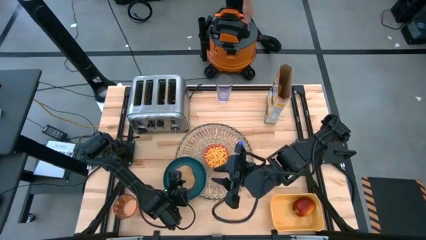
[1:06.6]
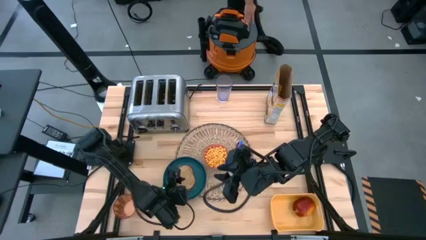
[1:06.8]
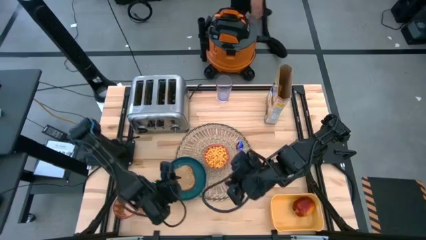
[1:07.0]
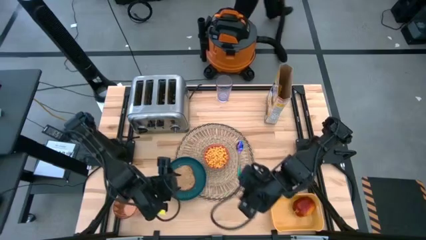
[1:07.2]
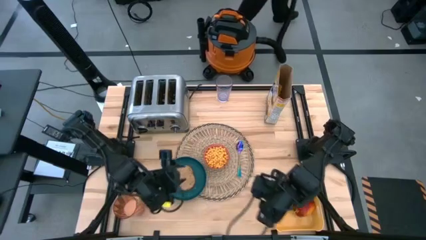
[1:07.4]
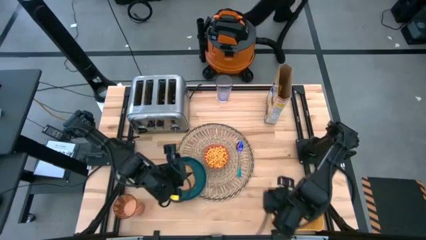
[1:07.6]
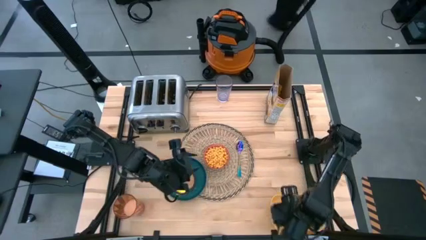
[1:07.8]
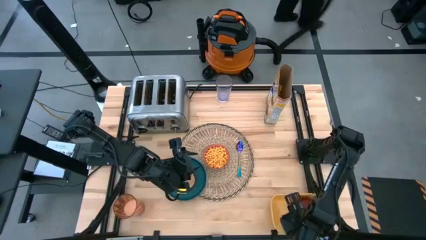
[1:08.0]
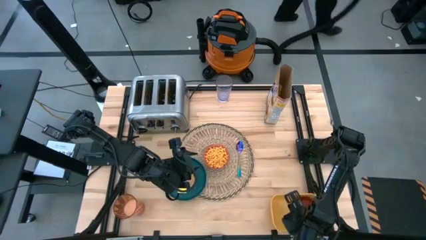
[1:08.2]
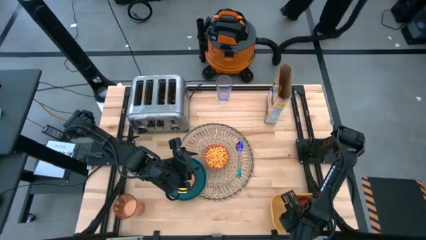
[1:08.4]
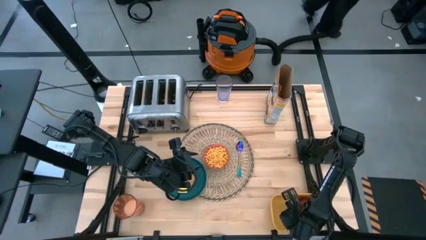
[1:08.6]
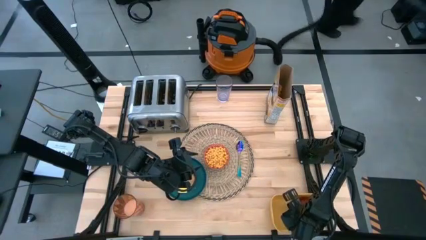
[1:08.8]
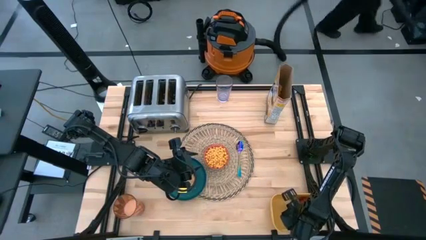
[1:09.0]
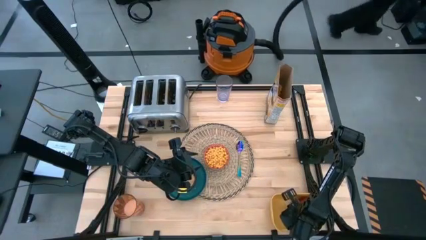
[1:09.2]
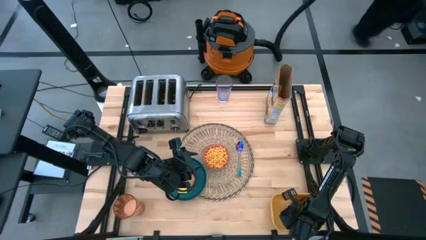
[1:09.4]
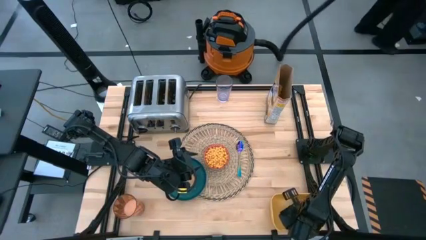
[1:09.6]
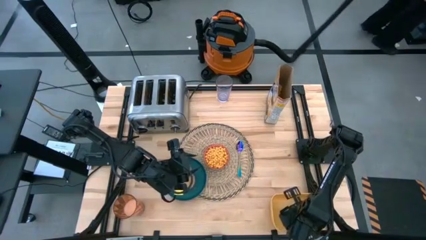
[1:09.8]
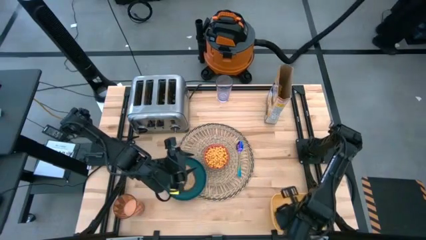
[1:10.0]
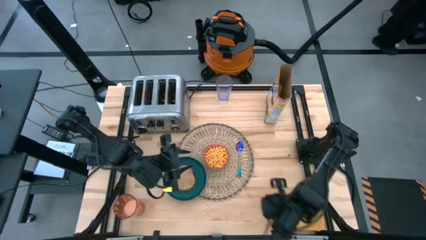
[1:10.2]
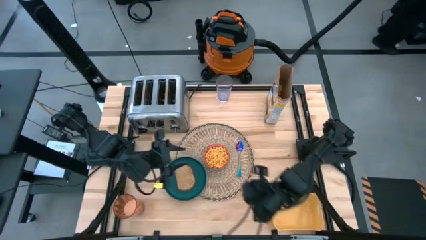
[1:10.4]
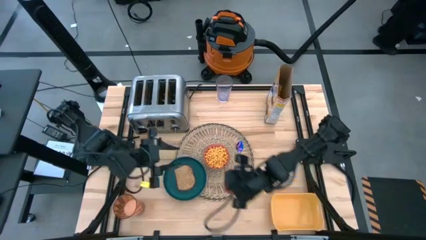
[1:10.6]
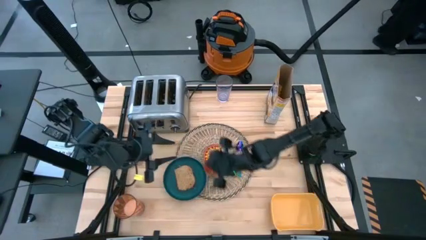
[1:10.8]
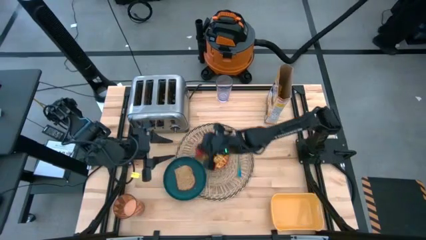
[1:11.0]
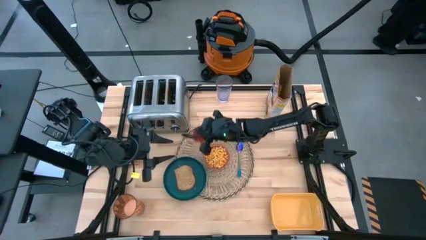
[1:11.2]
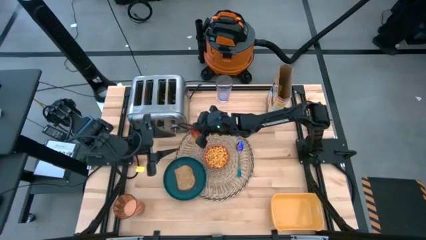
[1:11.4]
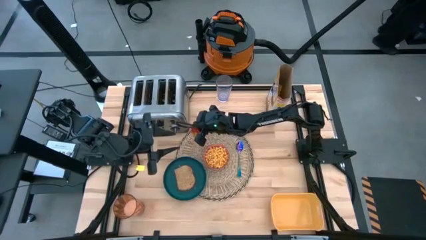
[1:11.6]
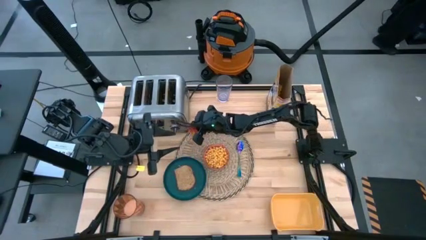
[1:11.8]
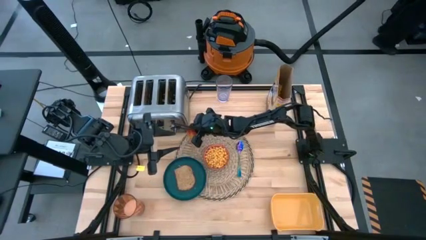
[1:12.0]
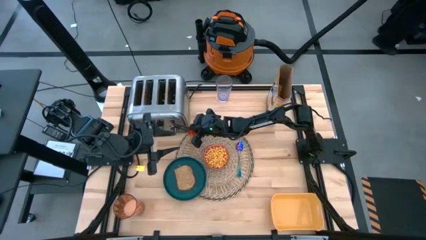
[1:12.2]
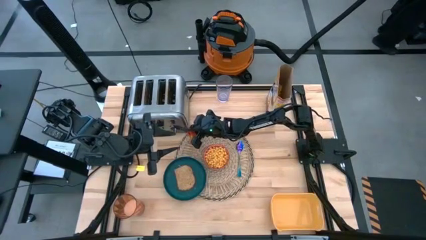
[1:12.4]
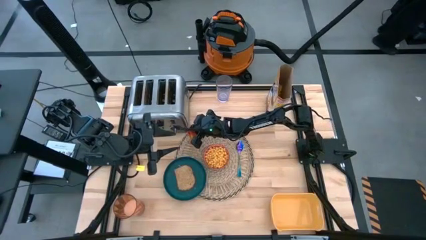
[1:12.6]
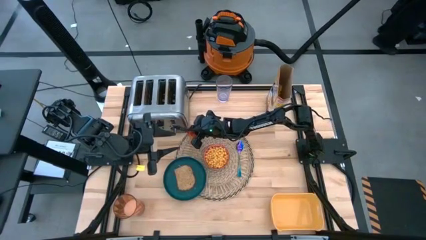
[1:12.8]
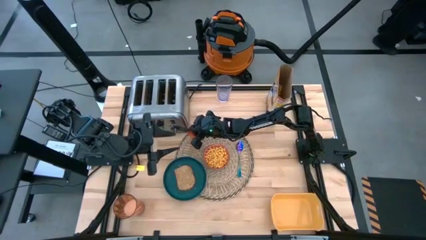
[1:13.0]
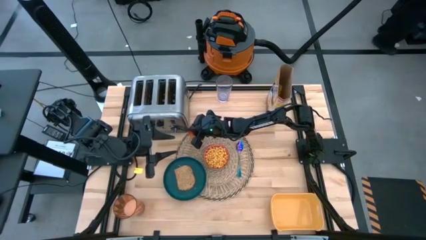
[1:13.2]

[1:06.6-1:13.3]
Task: Arrange a breakfast setting
Put the red apple above the blue plate

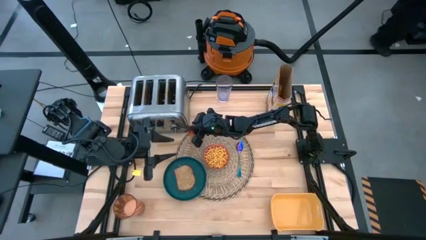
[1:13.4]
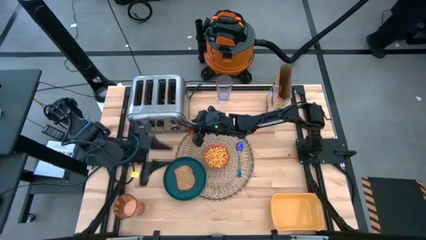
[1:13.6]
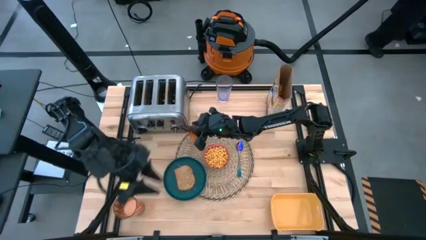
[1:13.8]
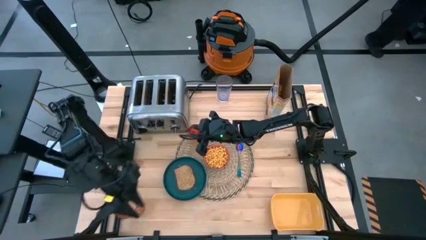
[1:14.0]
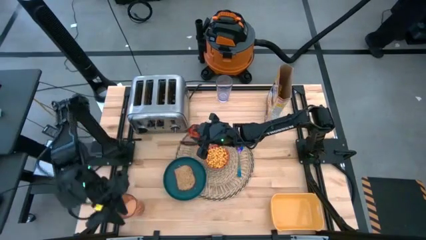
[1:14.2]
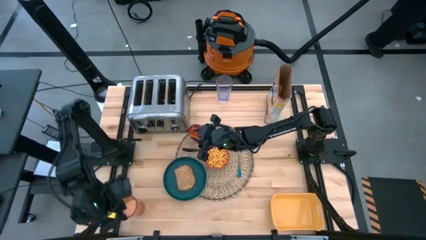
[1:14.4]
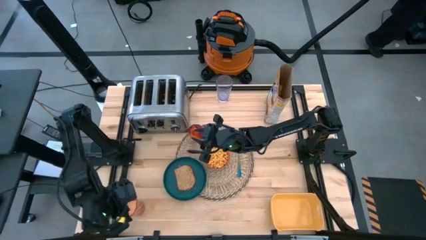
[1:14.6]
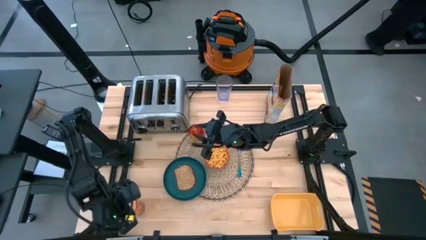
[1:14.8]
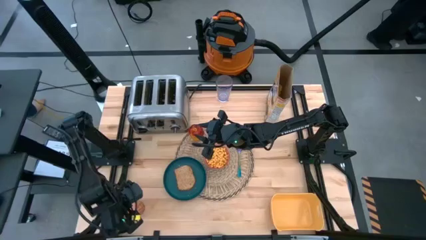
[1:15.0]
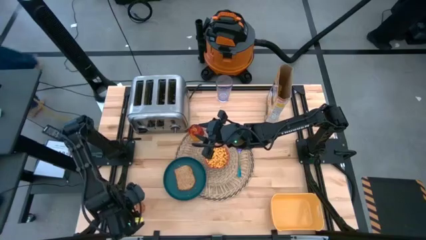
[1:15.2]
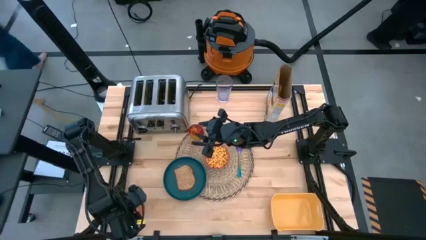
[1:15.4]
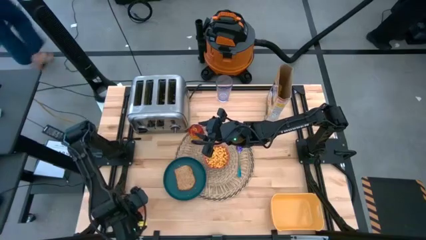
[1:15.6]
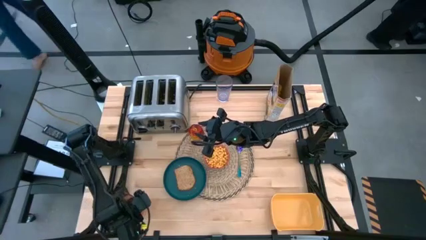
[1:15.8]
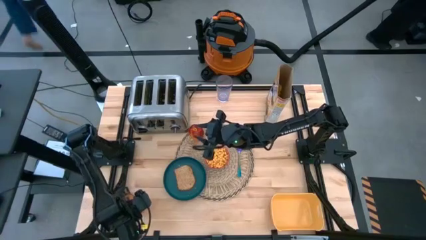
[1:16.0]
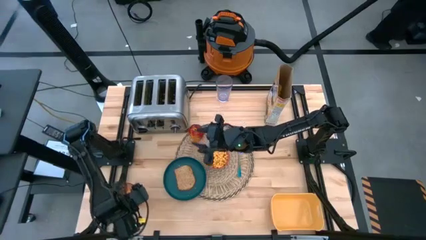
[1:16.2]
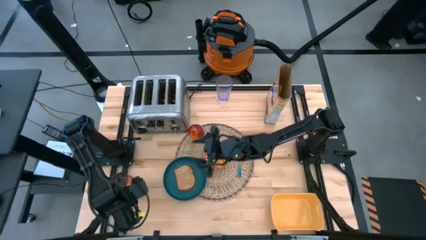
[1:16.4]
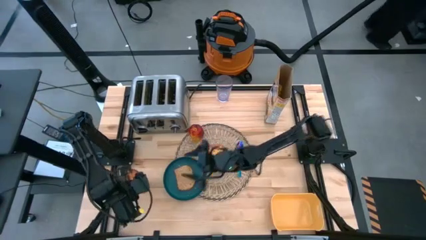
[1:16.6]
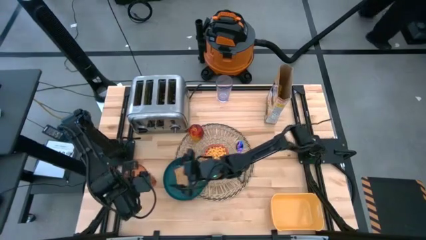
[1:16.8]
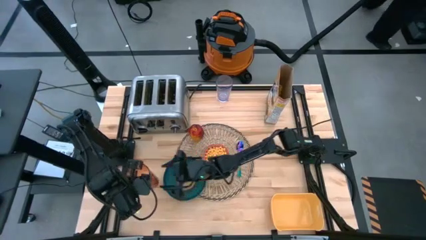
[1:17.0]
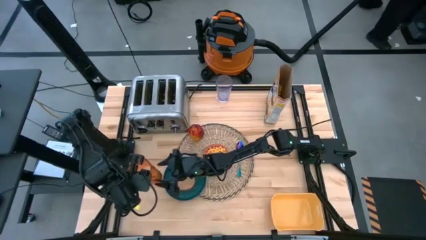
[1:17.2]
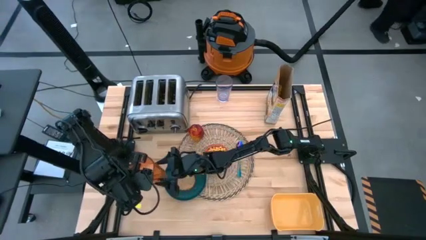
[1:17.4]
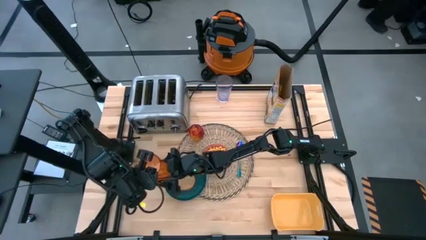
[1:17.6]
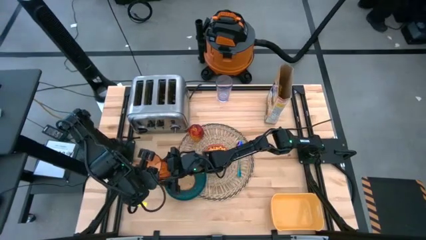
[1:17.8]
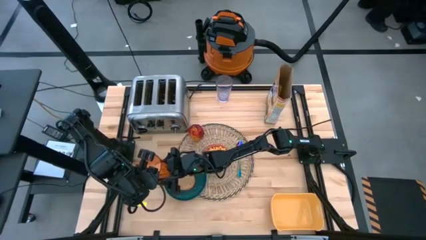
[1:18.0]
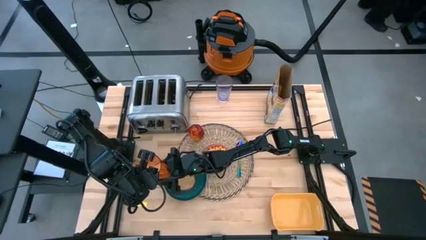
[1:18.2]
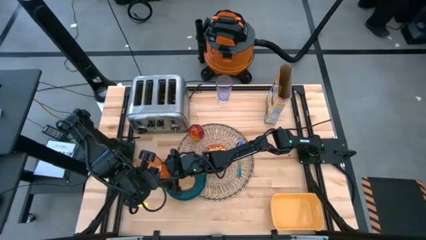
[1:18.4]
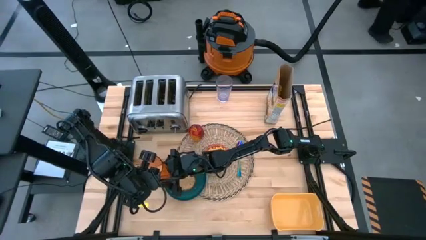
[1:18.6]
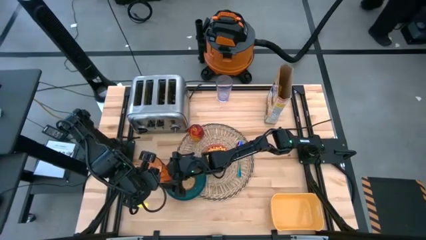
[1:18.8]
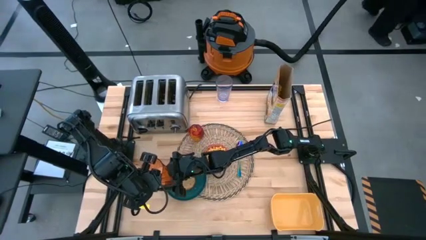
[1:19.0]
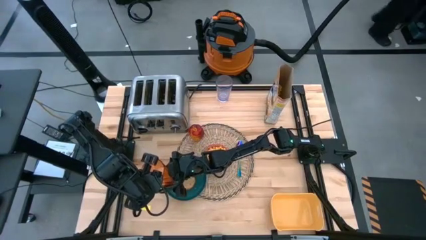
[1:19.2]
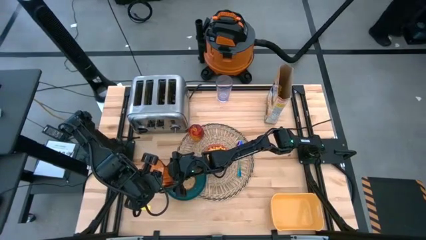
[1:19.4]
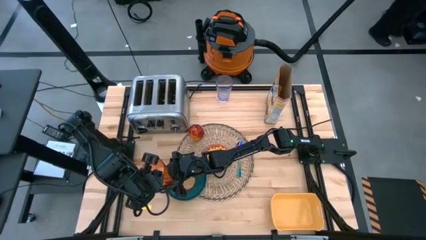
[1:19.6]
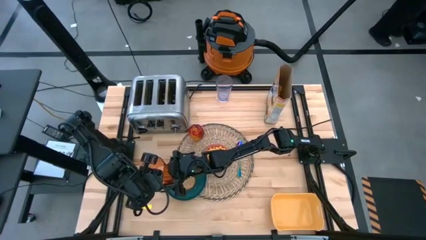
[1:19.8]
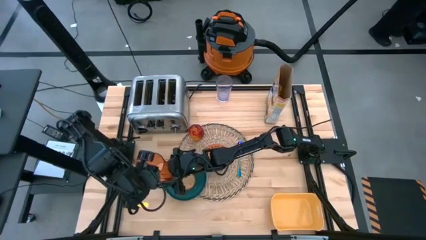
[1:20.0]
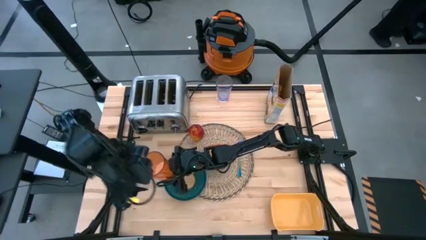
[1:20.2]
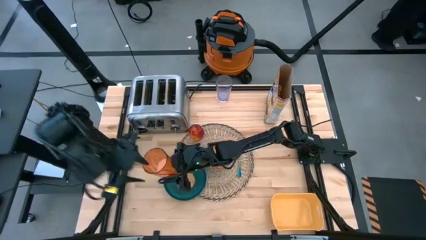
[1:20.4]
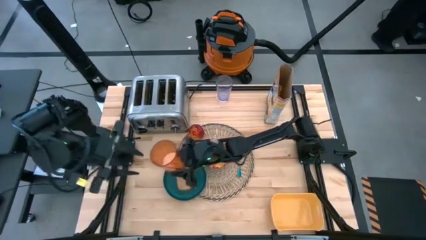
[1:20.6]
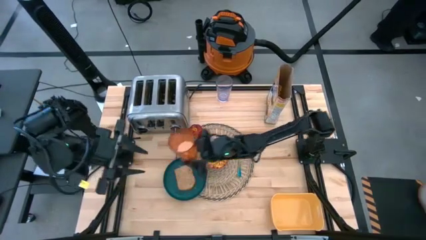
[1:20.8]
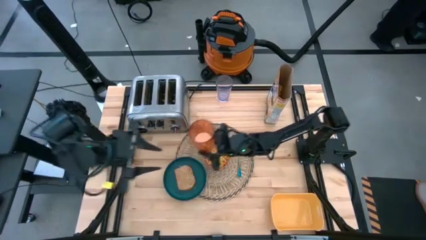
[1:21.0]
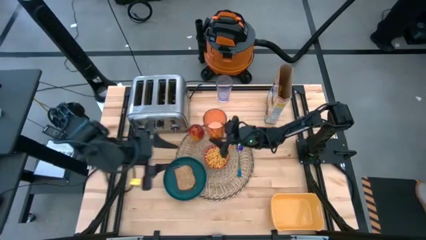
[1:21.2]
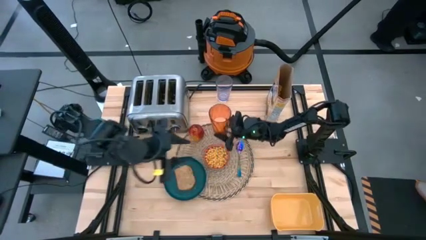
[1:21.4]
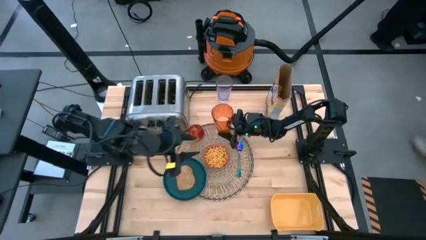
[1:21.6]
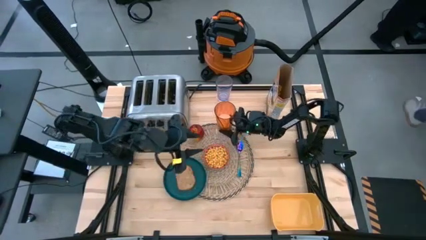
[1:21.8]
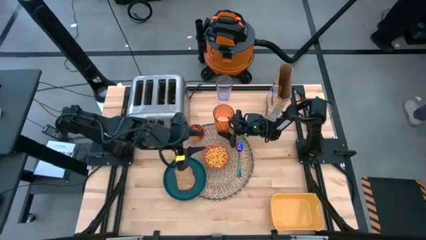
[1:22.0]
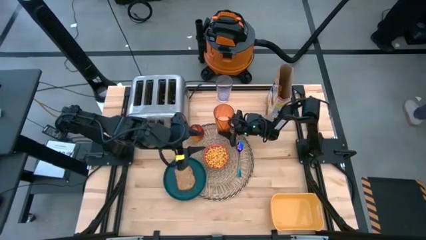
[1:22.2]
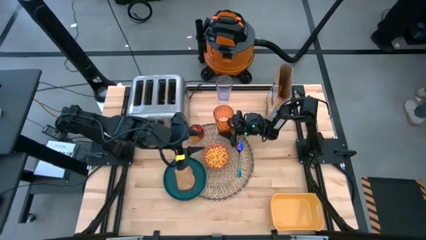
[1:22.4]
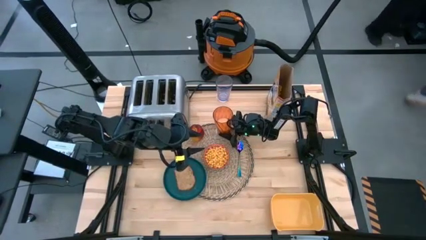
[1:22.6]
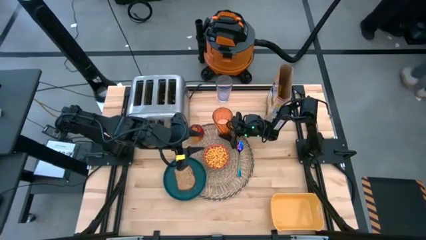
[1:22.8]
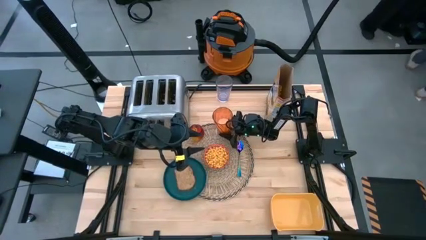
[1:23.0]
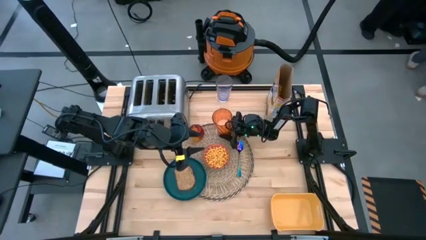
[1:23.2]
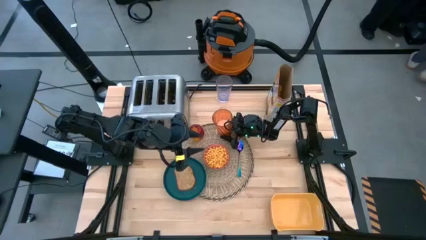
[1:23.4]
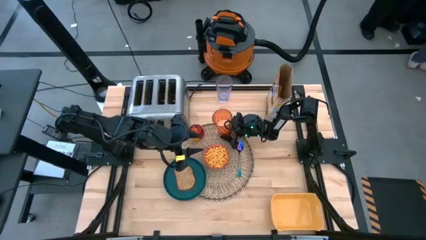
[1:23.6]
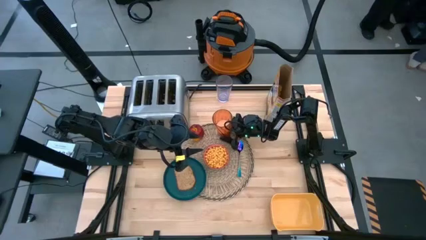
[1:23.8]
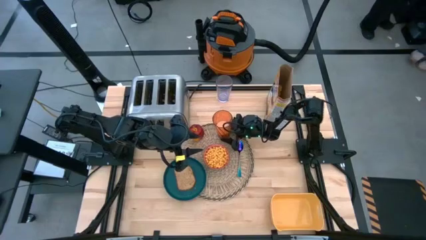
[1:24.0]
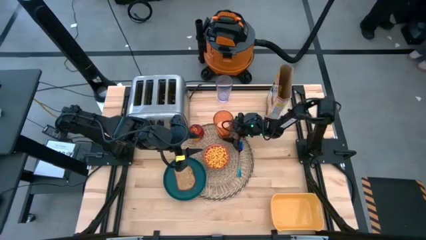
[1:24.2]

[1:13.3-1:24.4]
Put the orange glass above the red bowl
